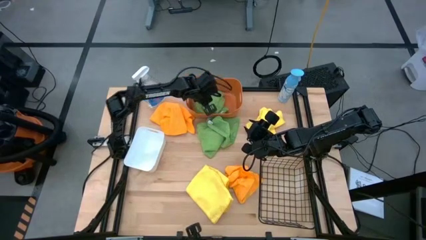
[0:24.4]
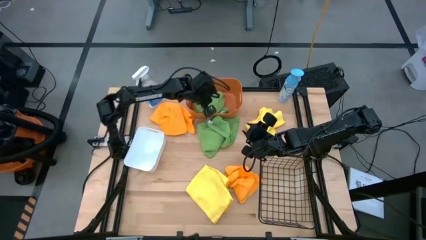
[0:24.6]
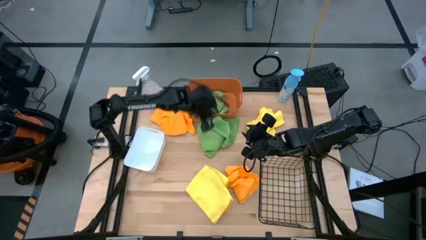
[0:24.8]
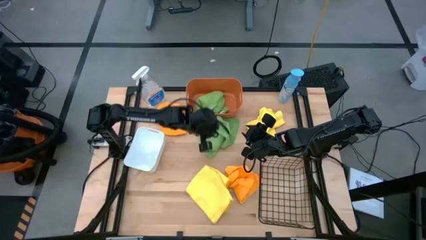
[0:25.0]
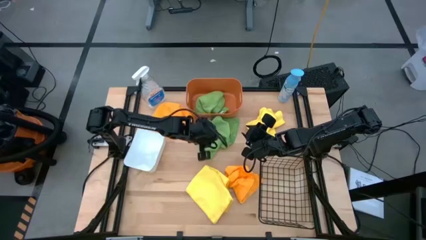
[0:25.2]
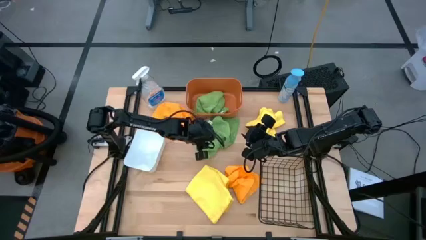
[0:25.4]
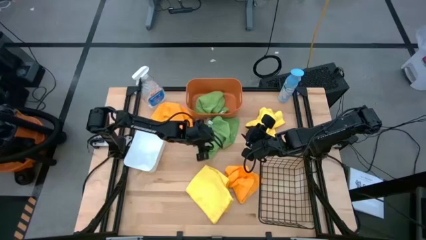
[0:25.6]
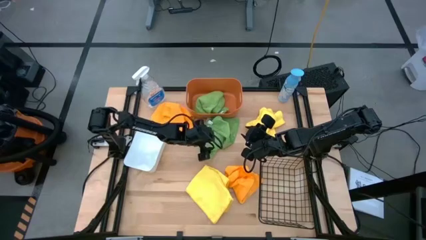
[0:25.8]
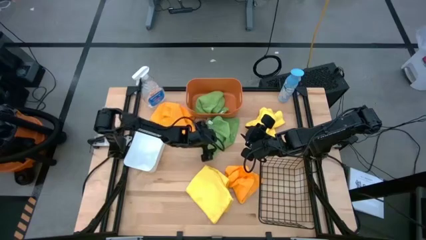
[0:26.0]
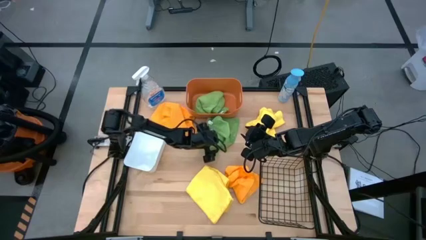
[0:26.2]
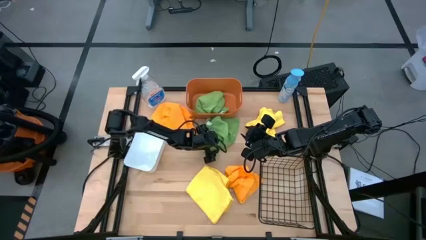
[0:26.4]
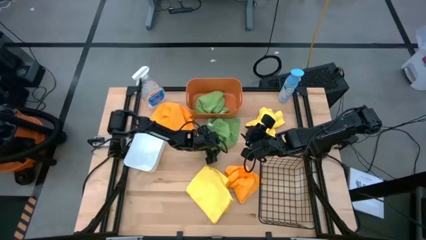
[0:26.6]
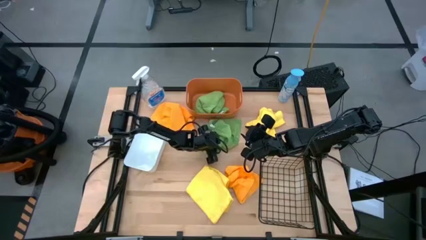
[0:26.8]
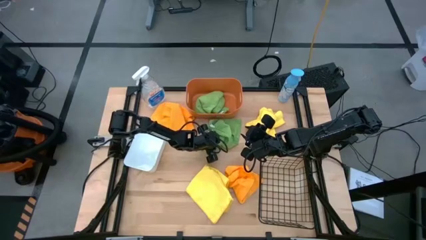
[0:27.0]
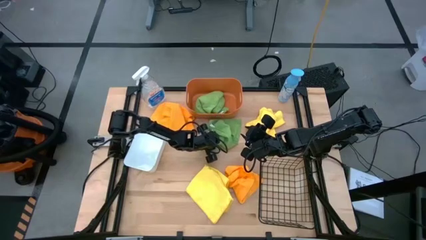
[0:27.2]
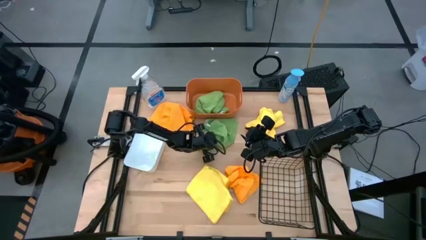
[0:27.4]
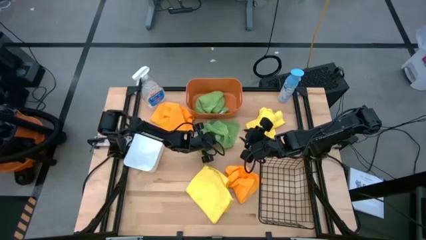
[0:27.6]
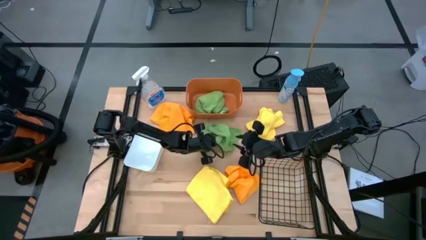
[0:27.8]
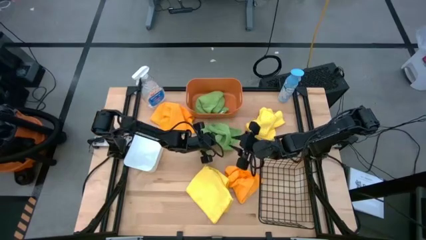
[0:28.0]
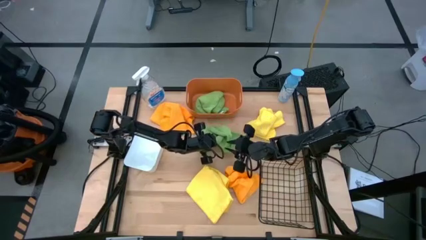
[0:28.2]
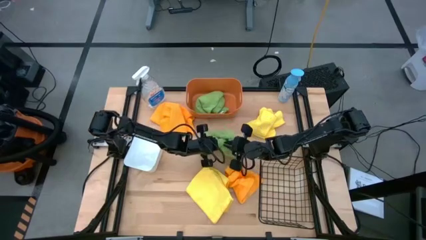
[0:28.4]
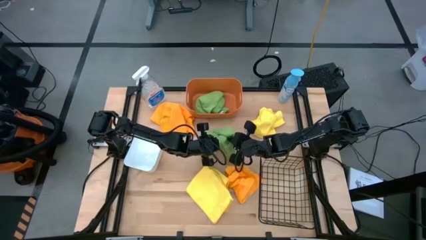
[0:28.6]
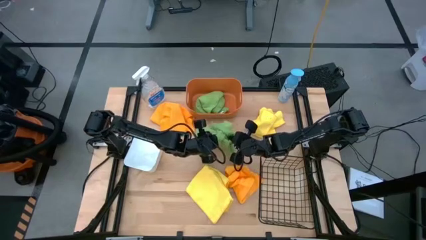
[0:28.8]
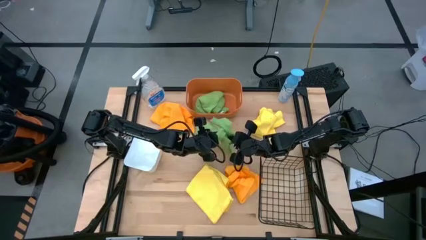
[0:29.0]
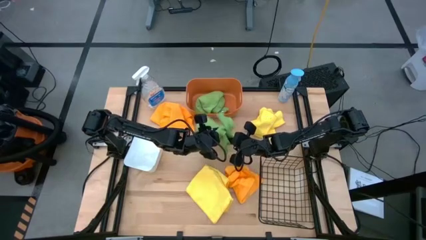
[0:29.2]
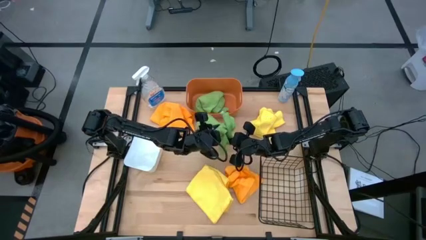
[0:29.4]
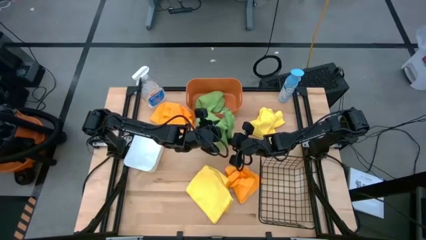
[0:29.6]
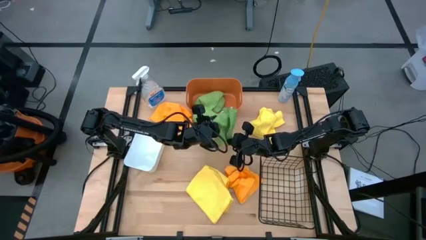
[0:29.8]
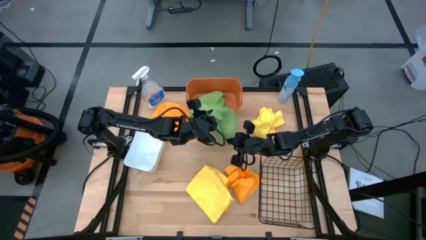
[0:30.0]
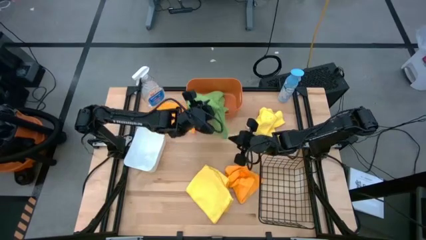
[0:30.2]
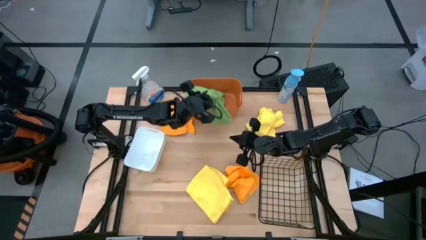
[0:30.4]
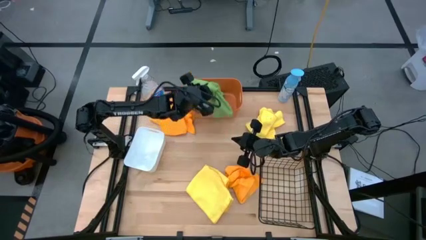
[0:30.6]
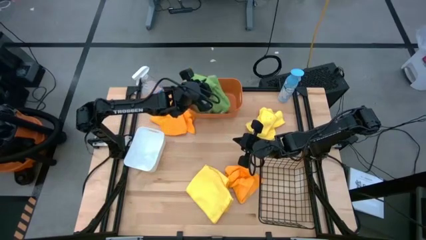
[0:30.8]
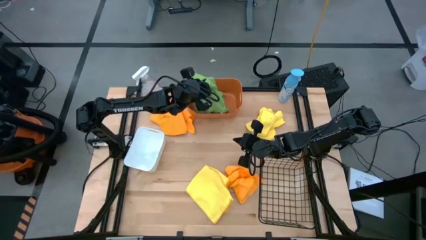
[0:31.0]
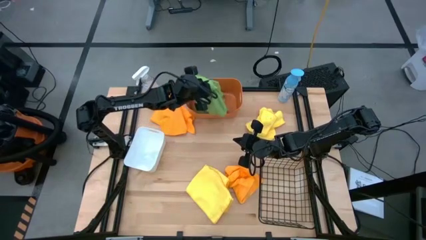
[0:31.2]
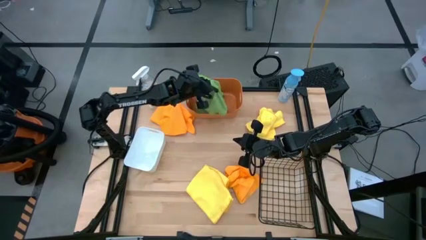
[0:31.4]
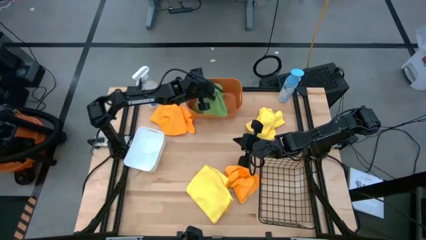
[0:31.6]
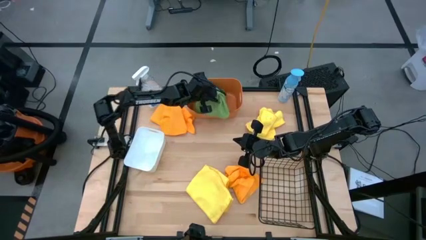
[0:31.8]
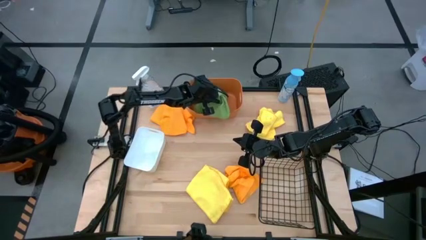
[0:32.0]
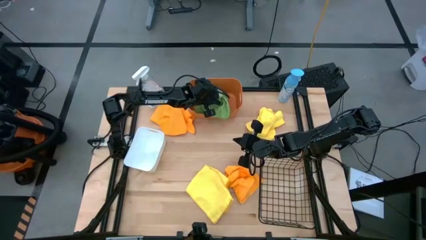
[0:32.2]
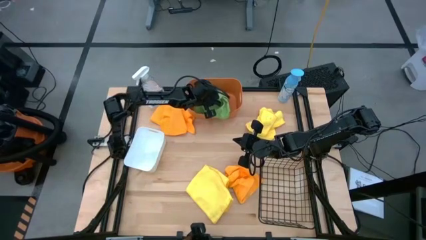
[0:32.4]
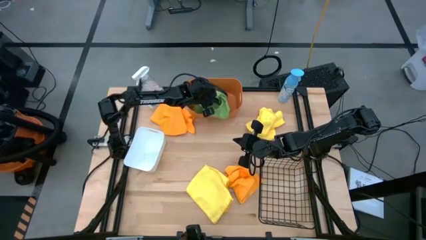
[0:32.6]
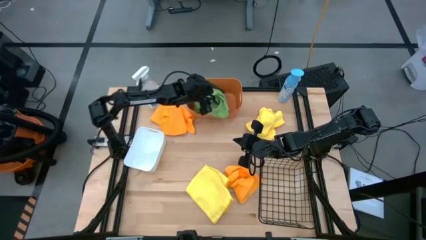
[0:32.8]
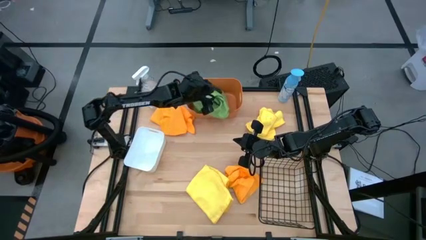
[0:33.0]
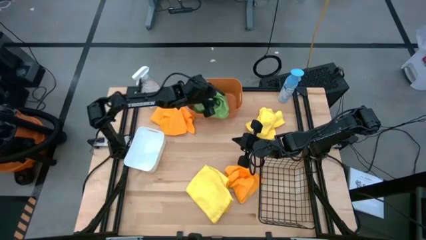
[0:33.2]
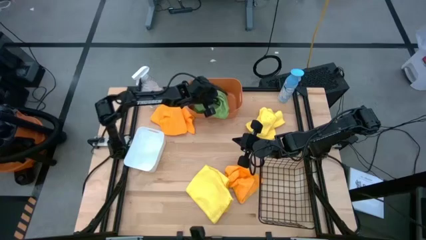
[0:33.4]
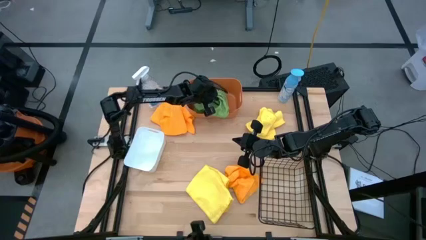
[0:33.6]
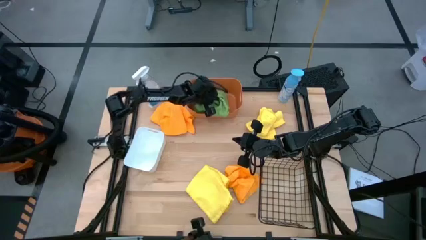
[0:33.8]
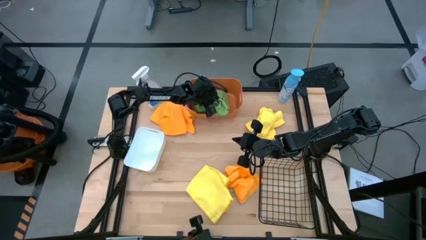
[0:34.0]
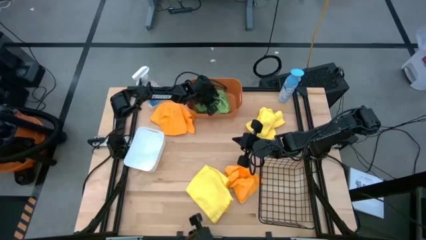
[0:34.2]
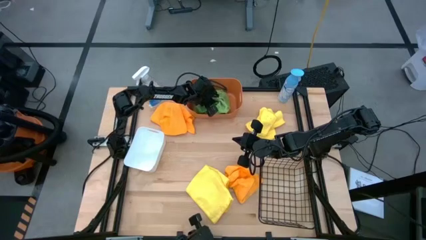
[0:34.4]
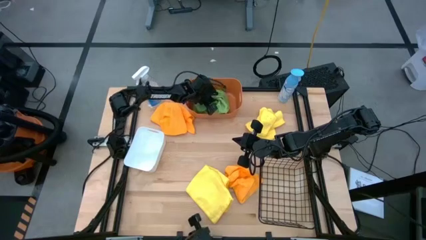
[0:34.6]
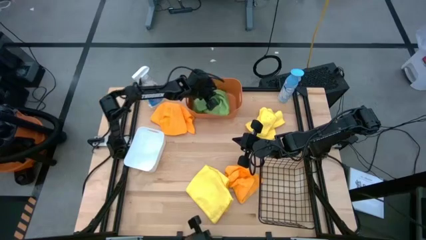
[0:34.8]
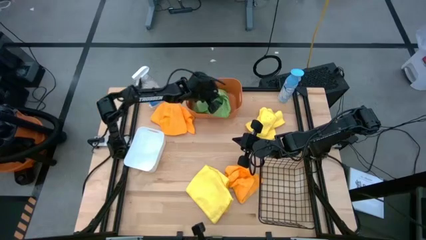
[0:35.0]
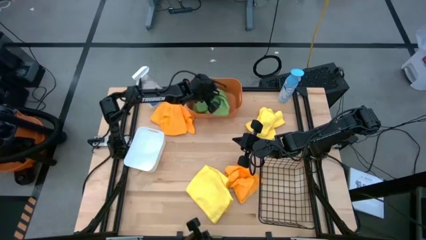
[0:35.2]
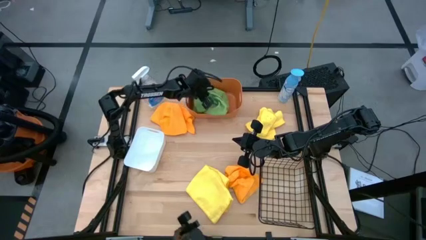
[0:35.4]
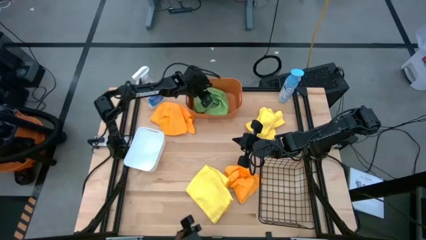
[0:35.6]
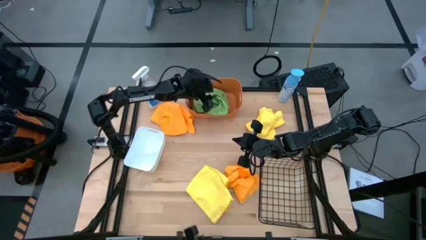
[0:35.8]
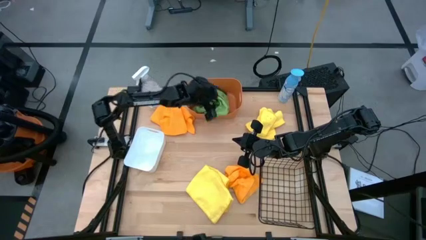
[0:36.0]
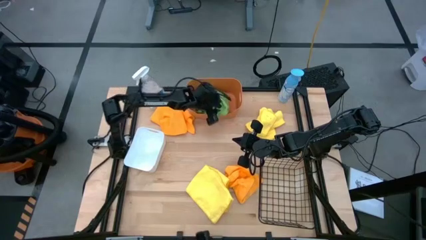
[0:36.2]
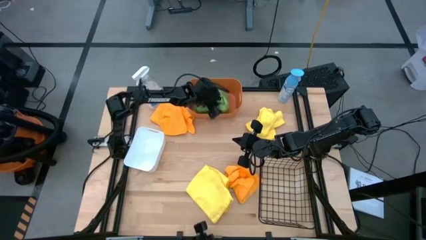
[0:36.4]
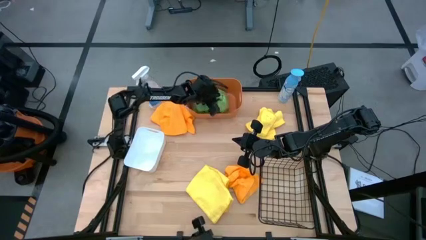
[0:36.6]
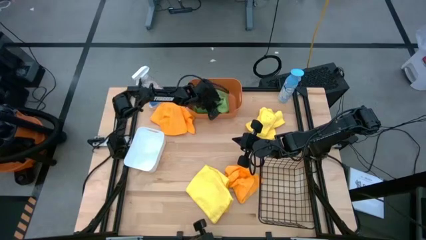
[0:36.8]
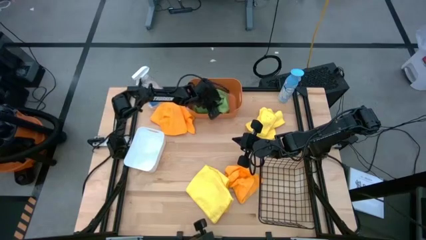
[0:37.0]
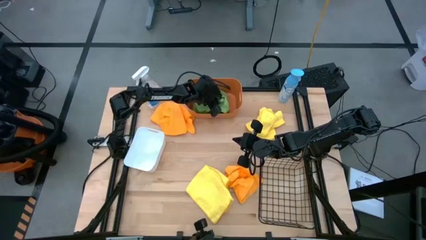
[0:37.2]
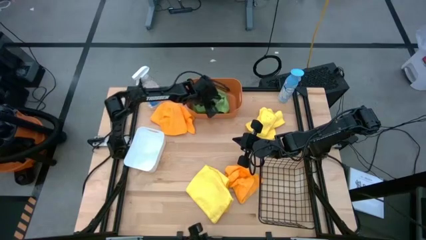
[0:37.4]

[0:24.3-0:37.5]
Task: Sort microfiber towel by color & place in baskets
Put the green microfiber cloth into the orange bin

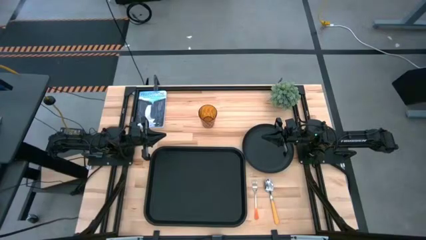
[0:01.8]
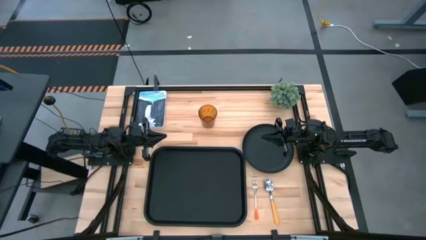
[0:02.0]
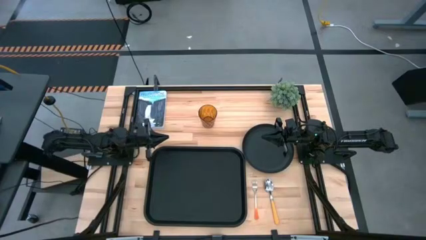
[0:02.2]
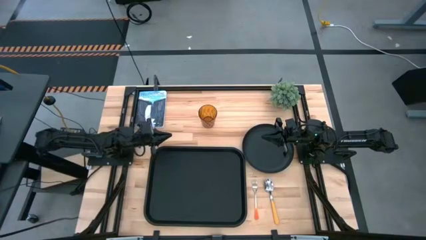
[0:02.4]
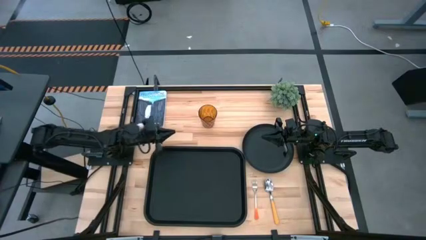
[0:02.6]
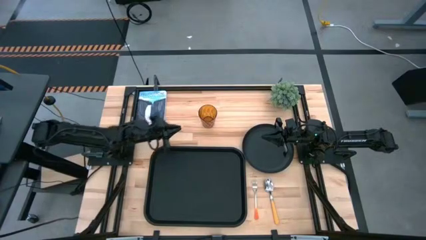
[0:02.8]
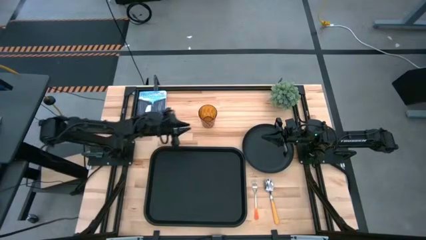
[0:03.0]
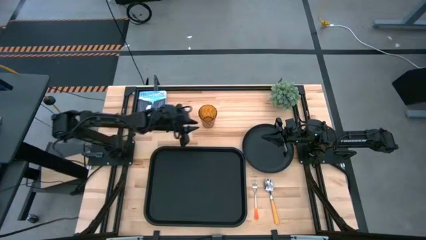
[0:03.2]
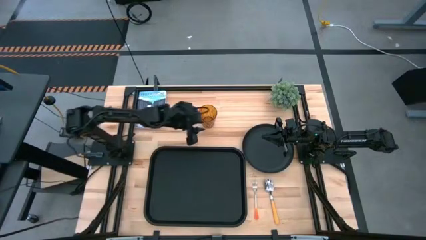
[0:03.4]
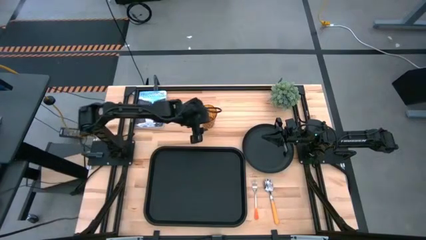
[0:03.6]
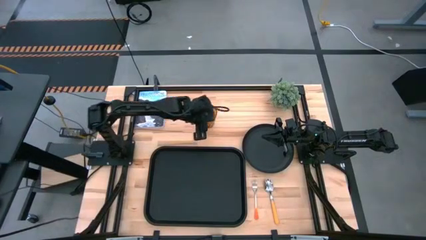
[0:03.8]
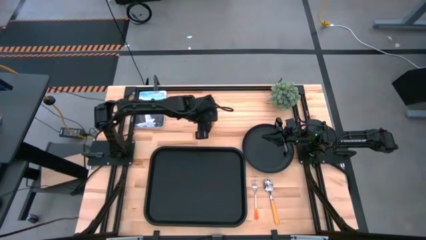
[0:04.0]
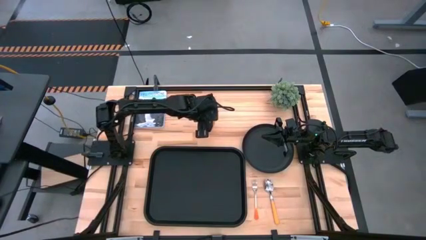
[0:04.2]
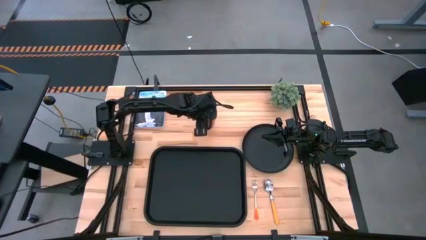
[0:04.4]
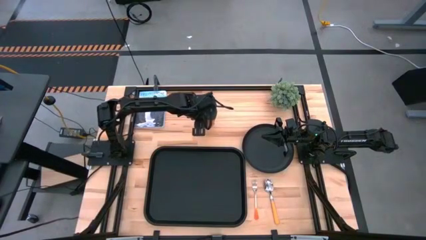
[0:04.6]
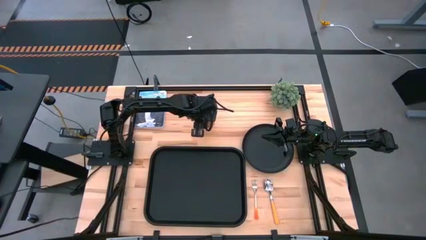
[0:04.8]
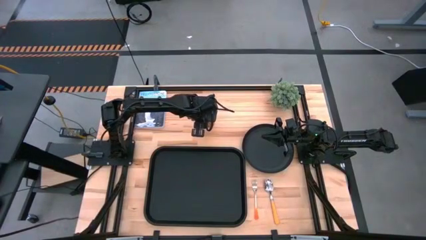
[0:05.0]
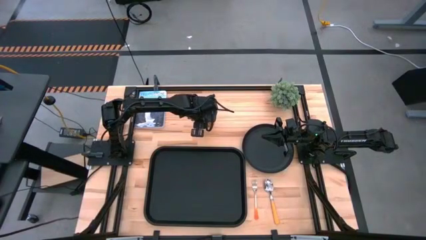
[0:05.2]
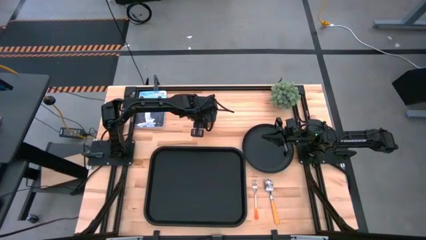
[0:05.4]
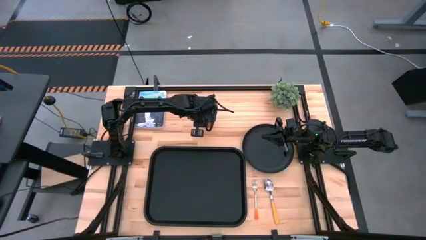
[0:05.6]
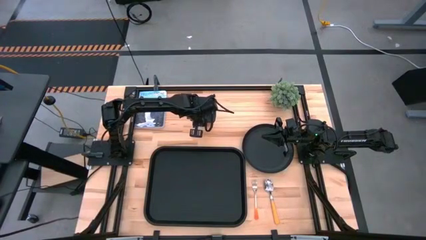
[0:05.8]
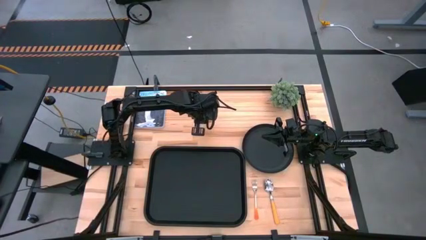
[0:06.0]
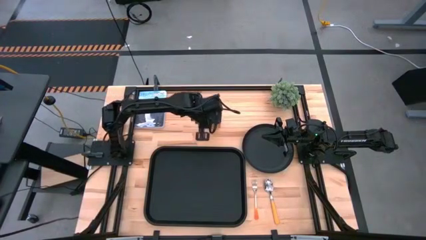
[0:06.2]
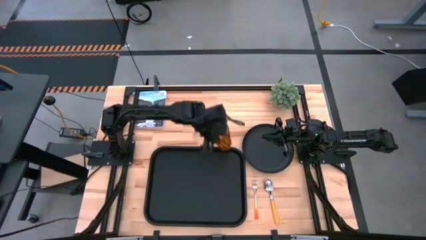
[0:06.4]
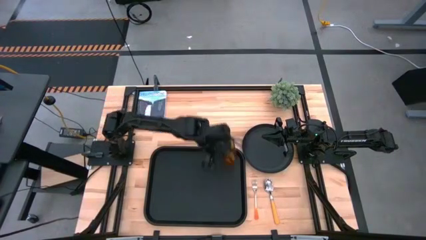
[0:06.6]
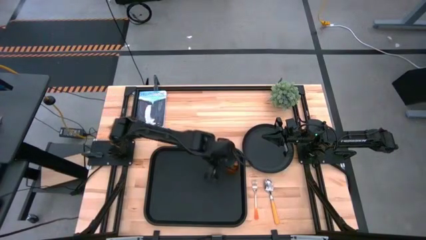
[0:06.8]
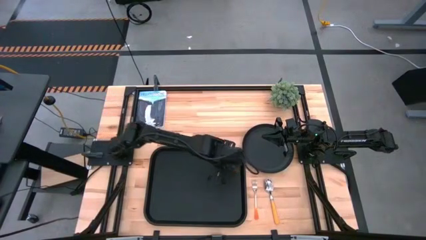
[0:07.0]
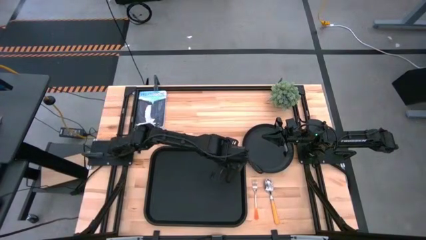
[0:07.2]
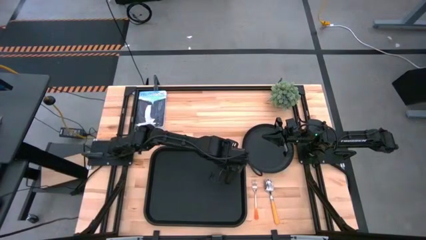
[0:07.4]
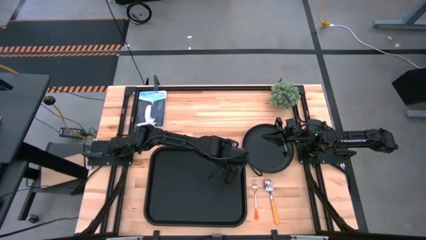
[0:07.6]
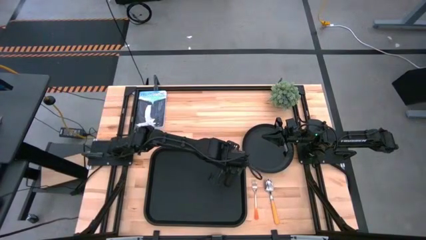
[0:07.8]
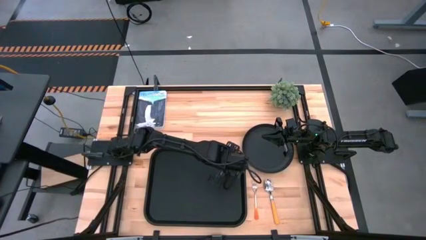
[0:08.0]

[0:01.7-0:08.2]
Task: Pick and place plate/cup/fork/spoon on tray
Put the orange cup on the top right of the black tray
